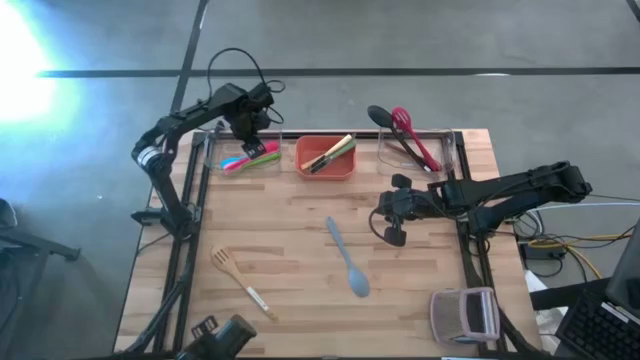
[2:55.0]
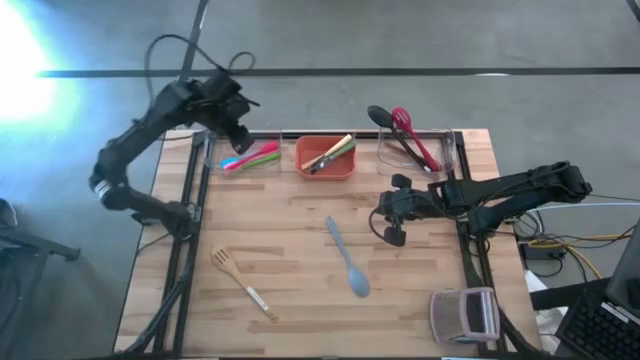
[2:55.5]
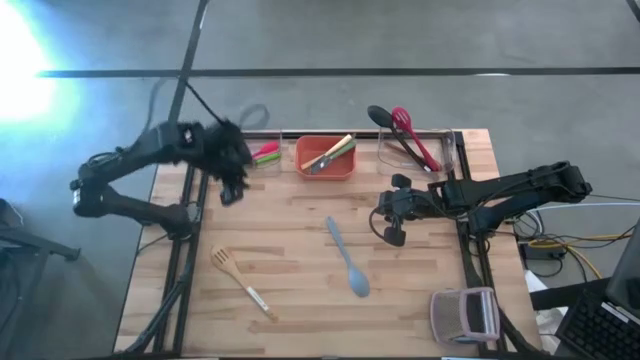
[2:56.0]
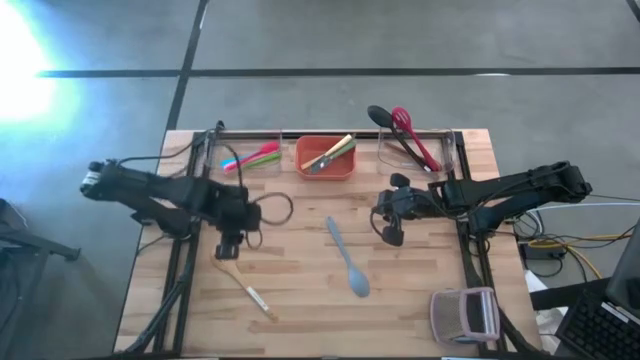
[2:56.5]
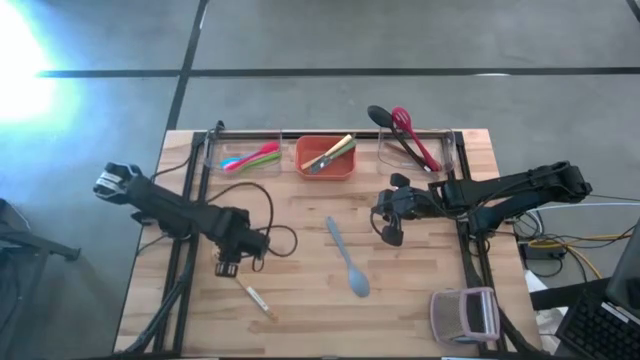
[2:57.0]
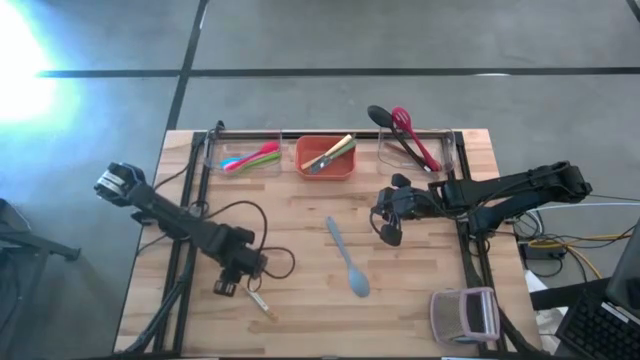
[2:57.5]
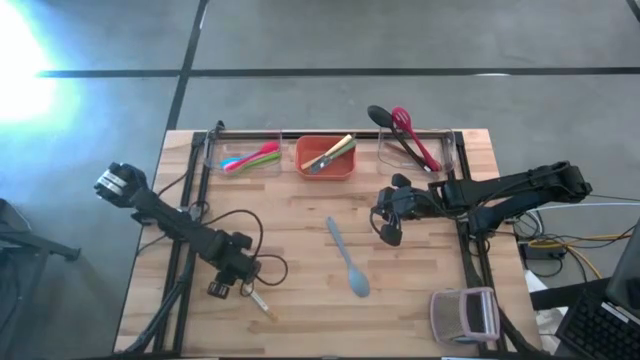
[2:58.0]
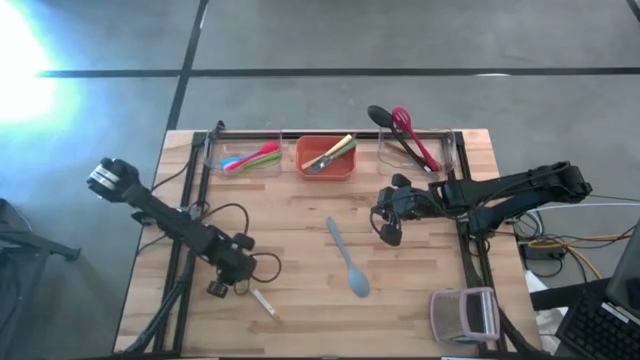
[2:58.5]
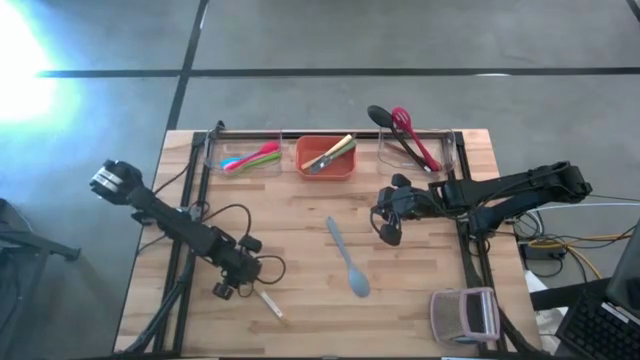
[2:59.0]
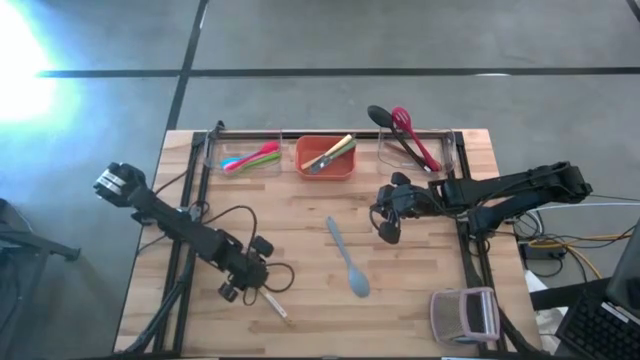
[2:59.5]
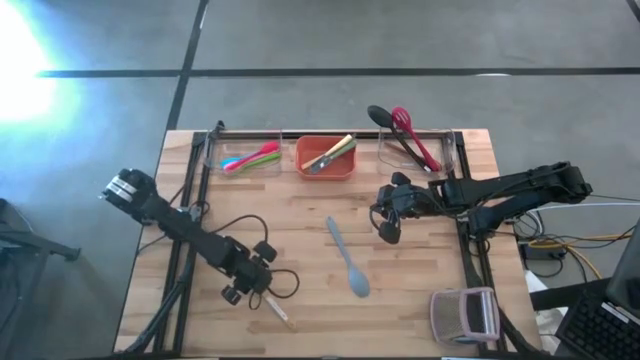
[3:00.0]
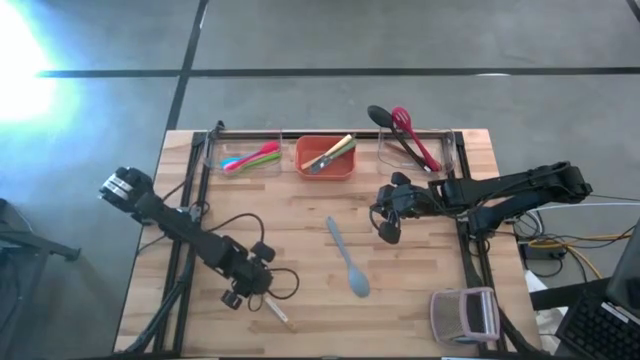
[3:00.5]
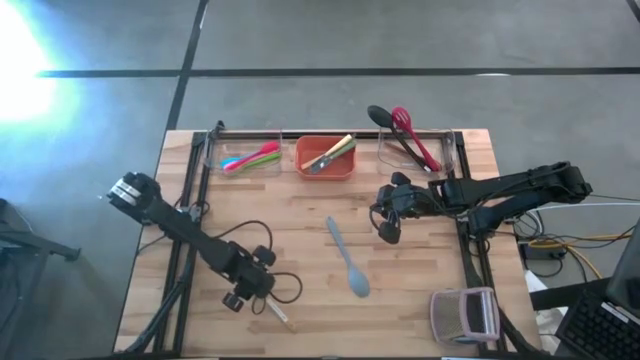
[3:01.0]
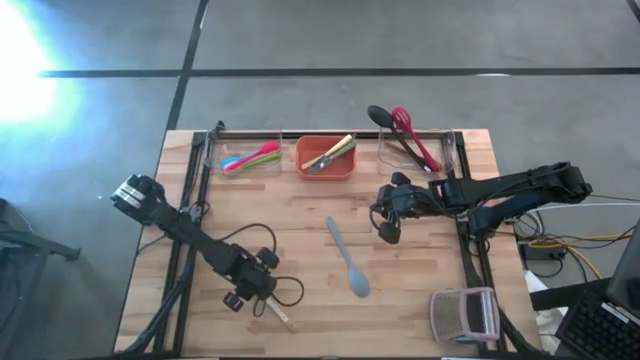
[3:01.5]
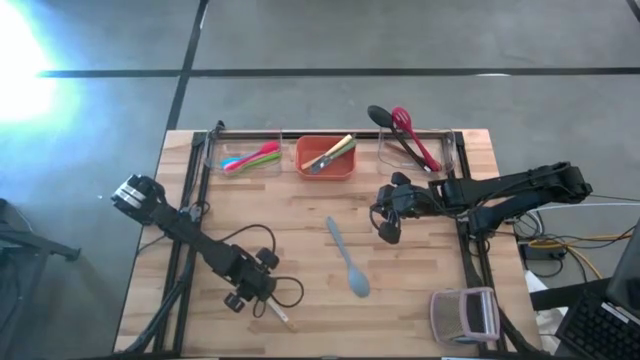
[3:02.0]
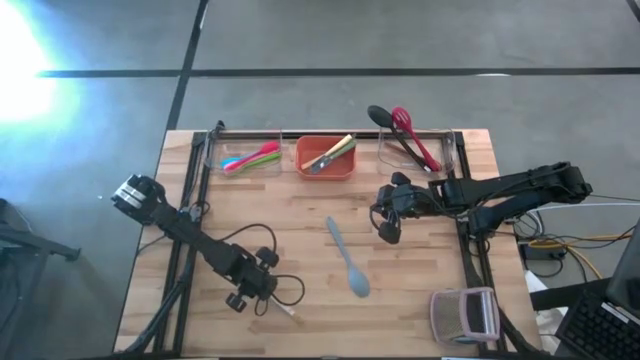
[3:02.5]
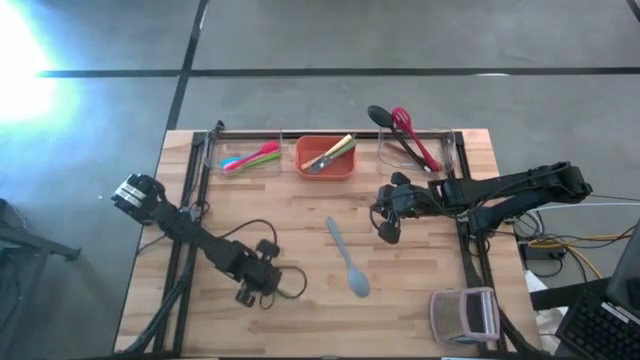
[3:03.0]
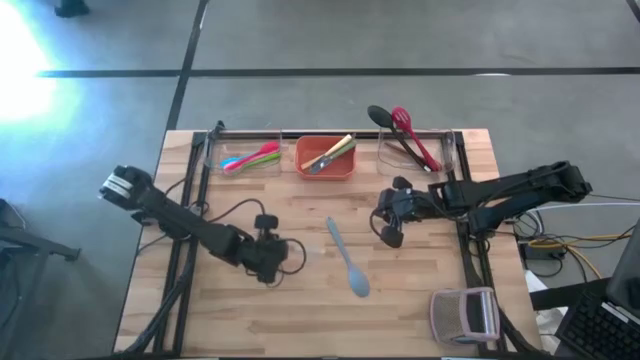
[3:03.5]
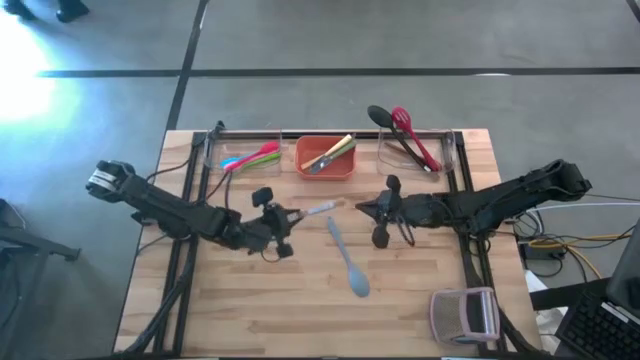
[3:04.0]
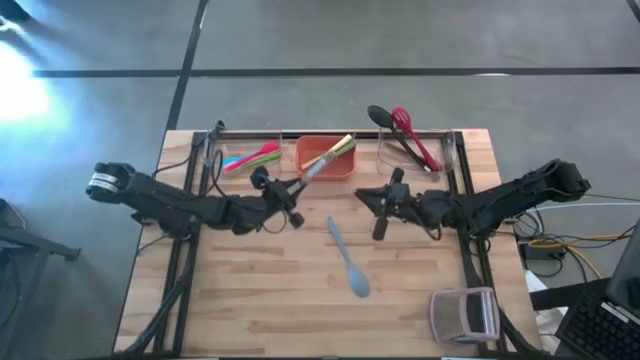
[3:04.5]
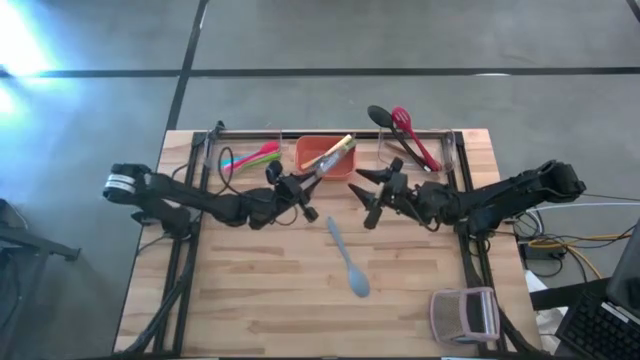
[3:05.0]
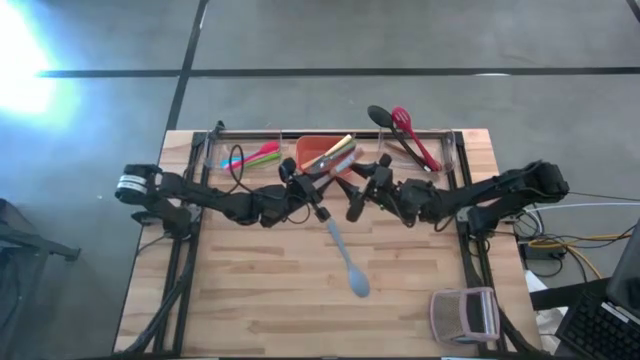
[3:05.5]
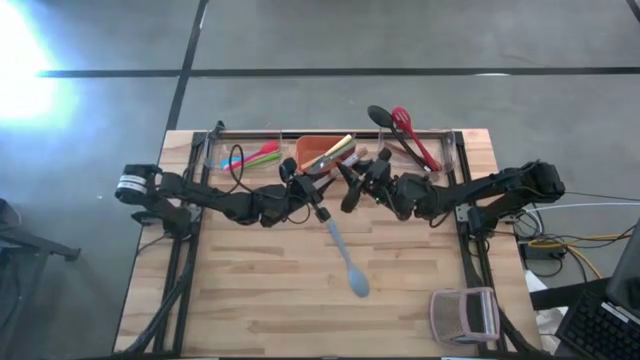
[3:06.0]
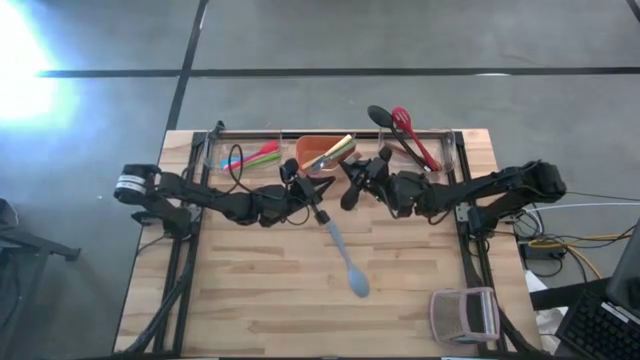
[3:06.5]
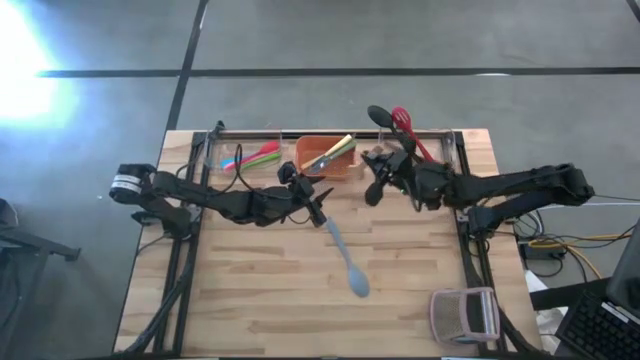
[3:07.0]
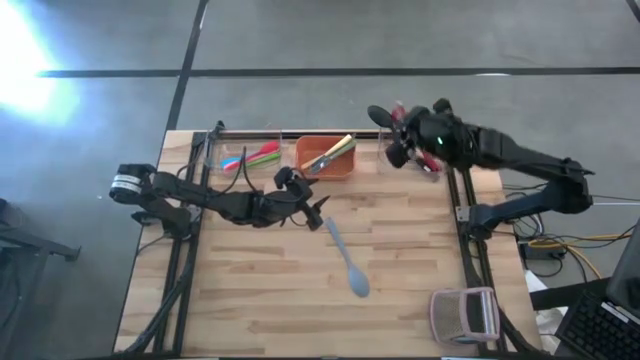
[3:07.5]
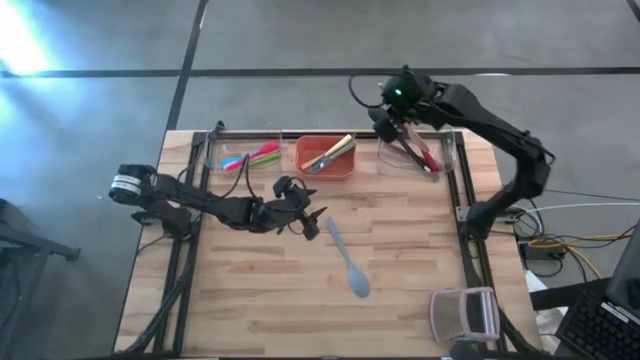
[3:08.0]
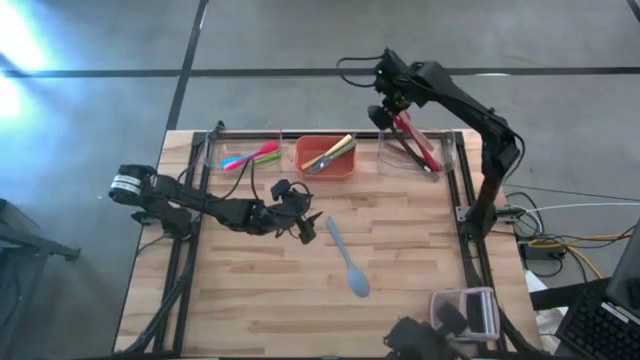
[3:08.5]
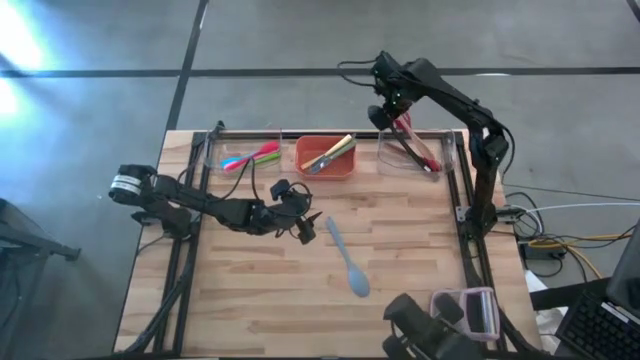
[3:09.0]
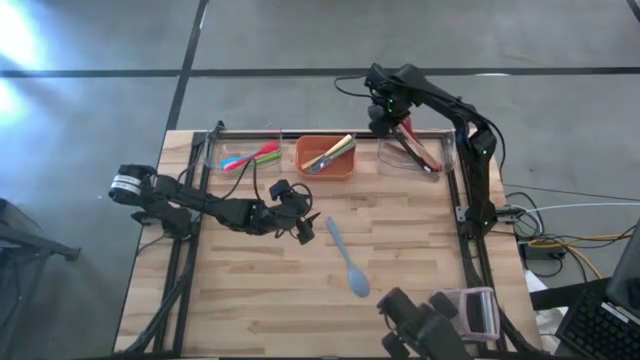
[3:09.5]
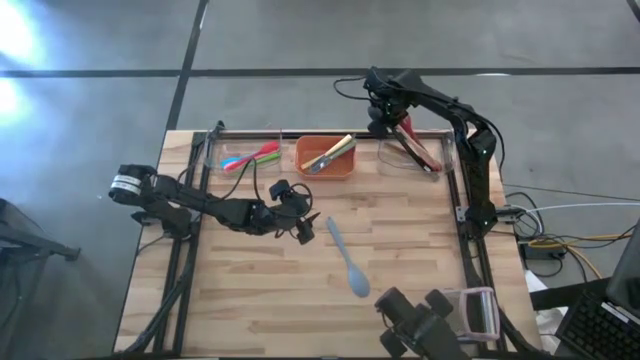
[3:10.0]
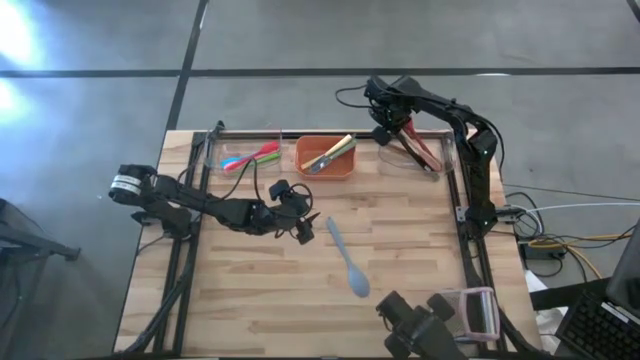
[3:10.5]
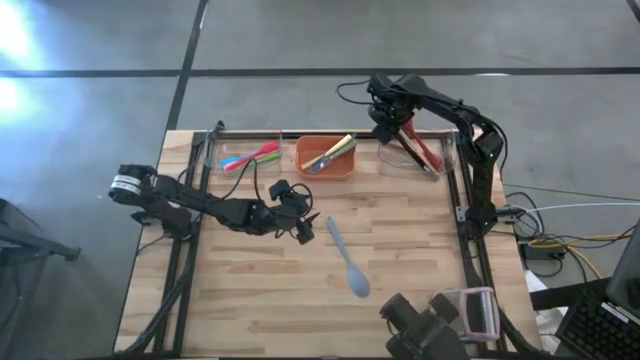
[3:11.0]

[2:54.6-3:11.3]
Task: Pick & Place Kitchen Items
Put the wooden serving spoon into the right transparent bin

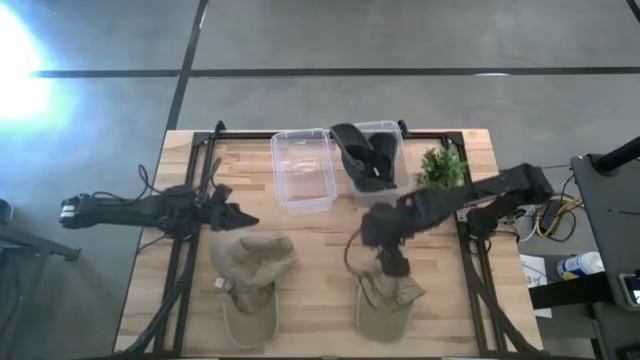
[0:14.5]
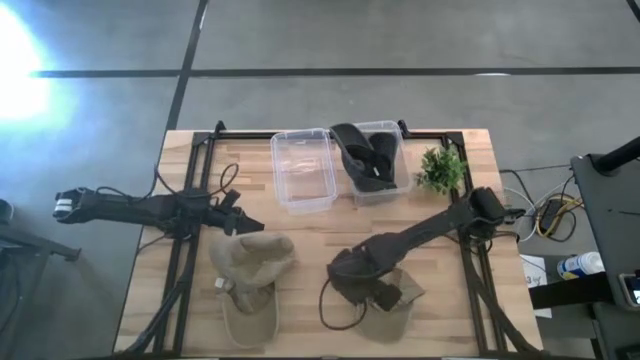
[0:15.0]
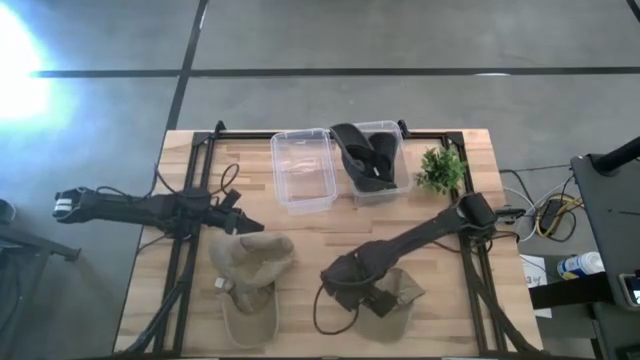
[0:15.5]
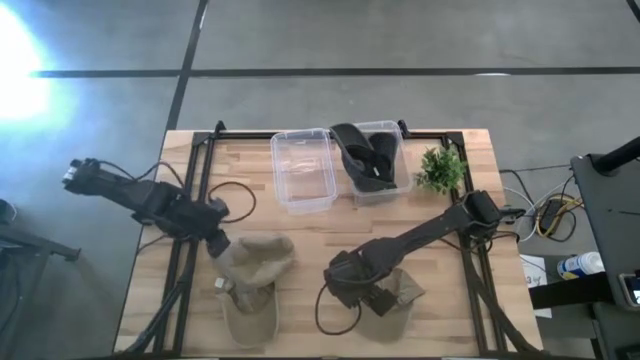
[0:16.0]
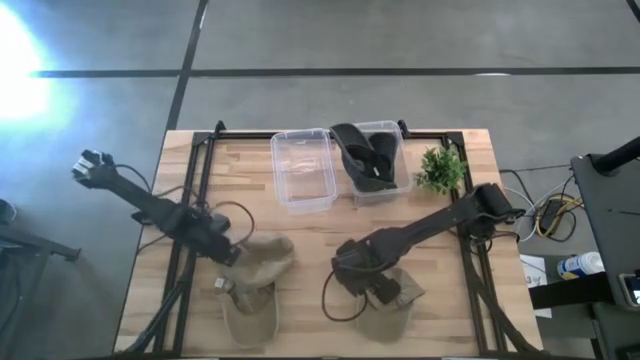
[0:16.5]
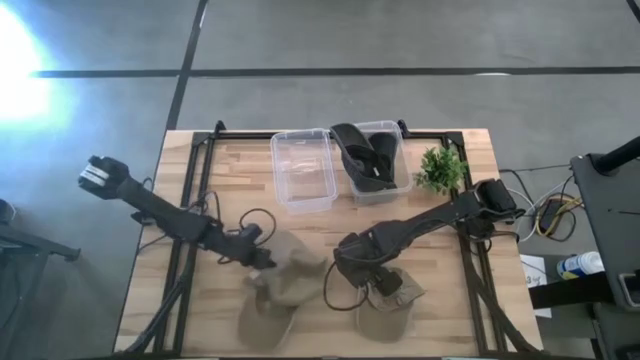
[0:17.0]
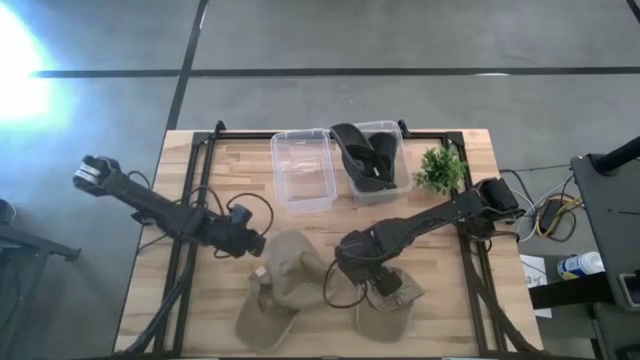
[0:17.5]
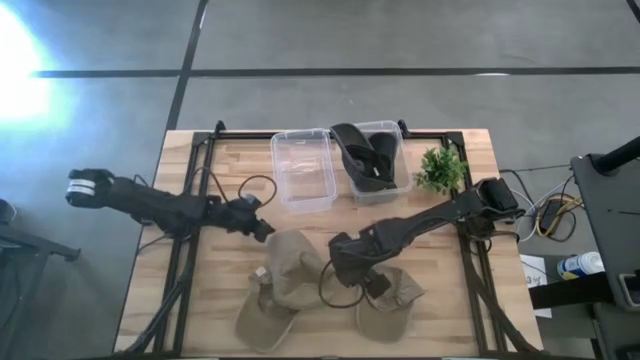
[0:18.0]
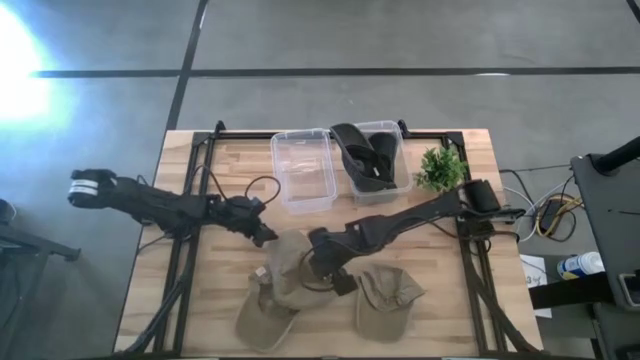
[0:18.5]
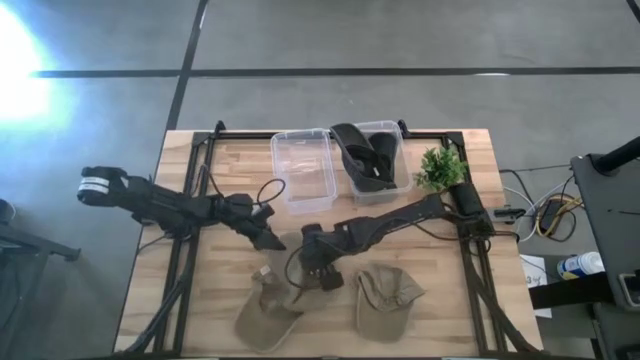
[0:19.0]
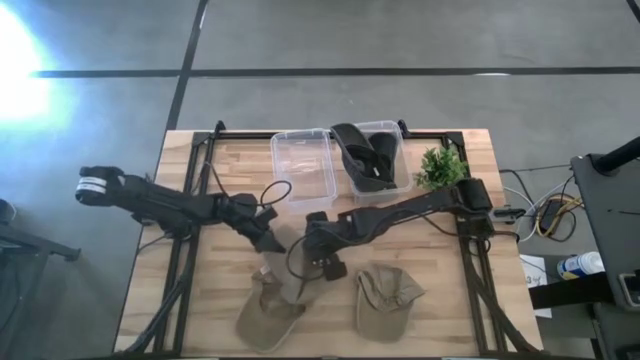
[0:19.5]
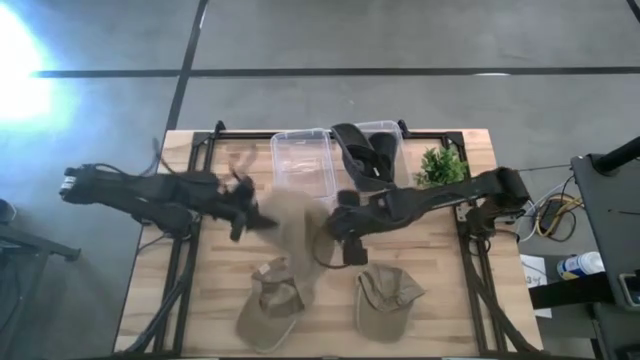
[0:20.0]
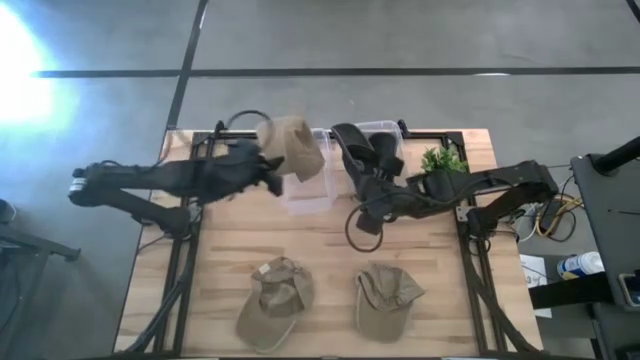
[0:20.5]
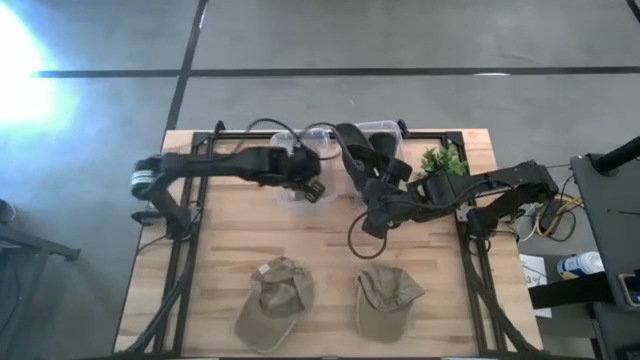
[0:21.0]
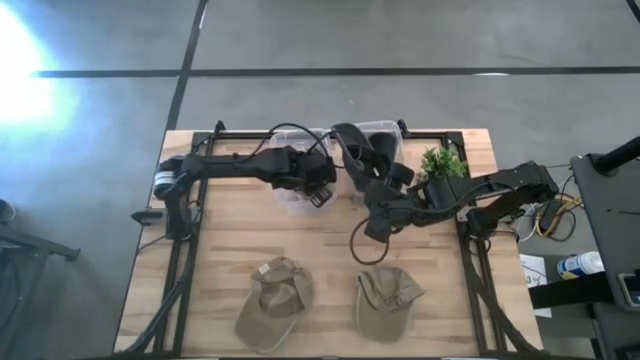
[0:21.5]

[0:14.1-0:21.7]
Task: Pick & Place hat
Put the top brown cap into the left transparent bin
